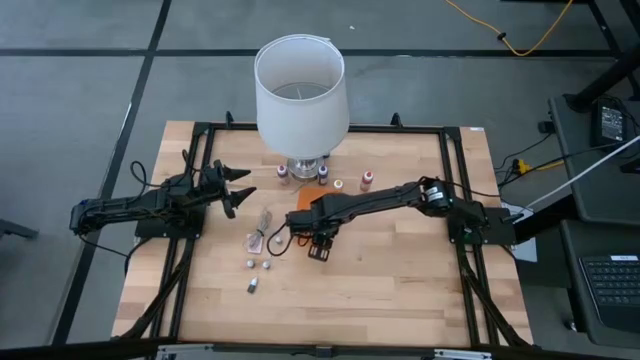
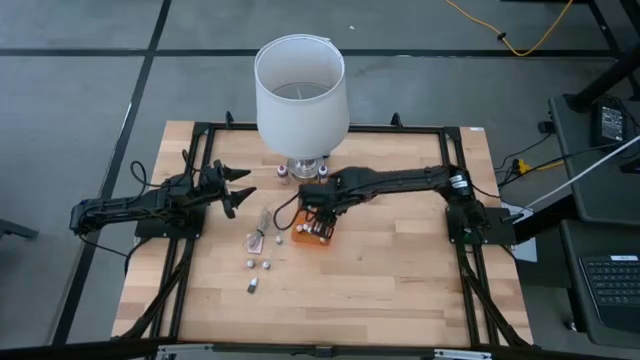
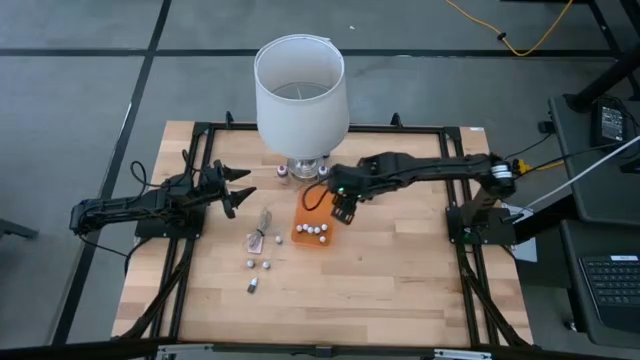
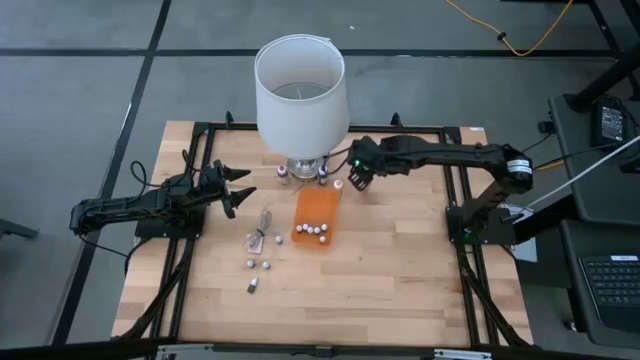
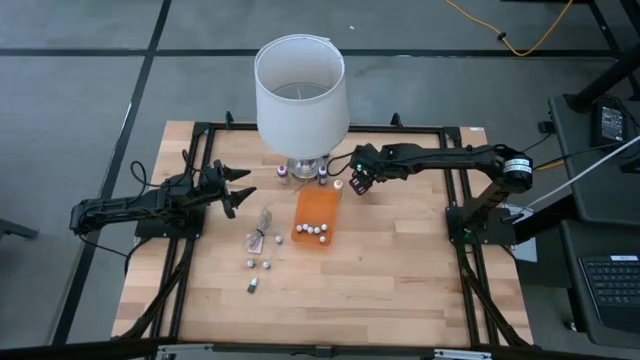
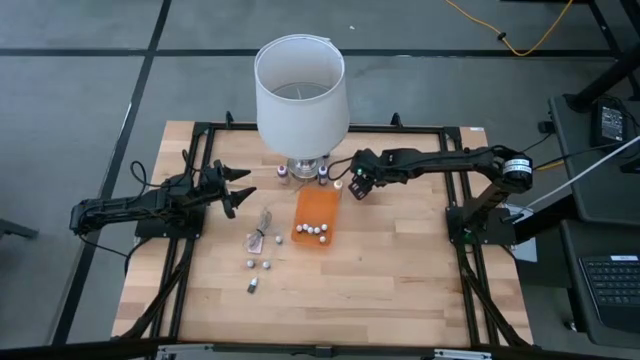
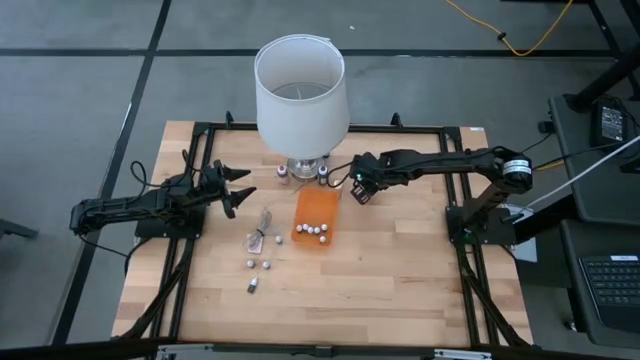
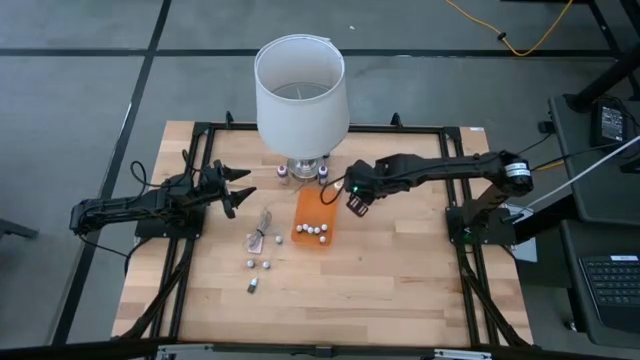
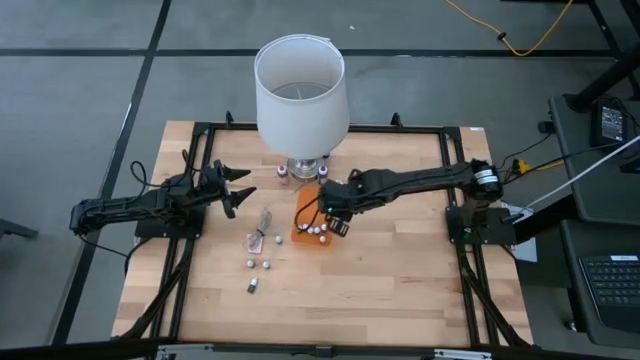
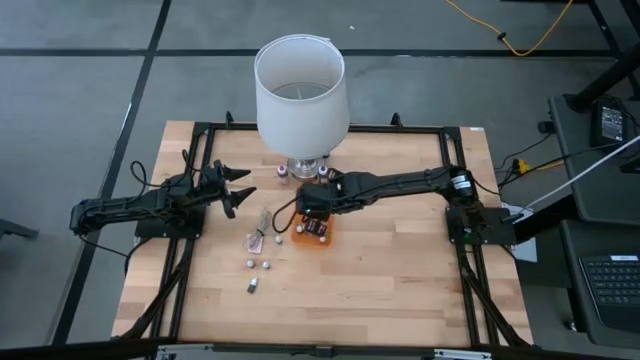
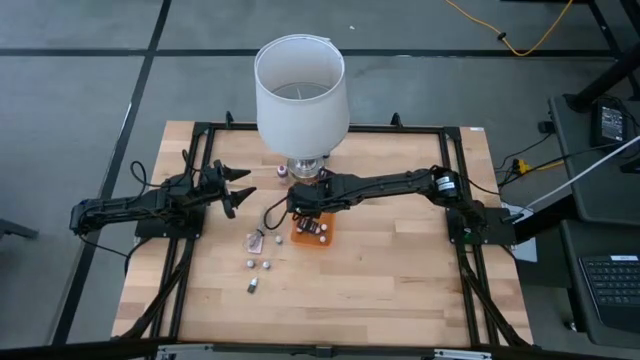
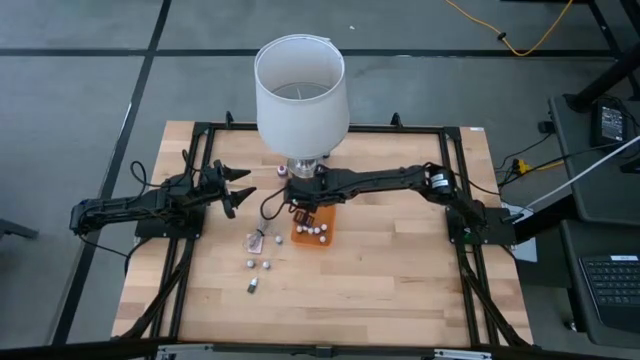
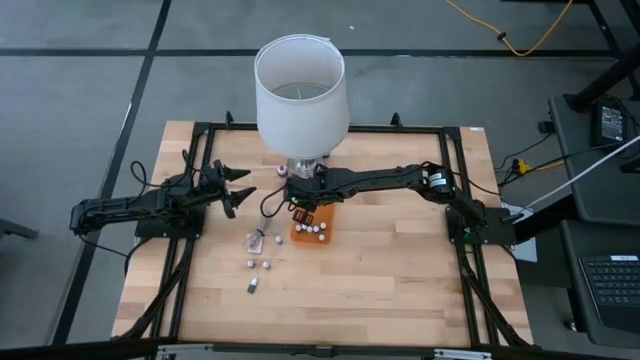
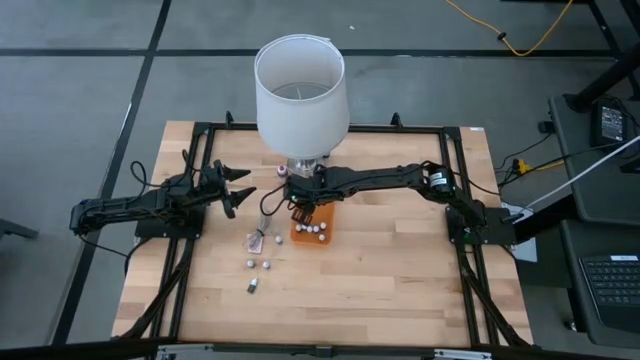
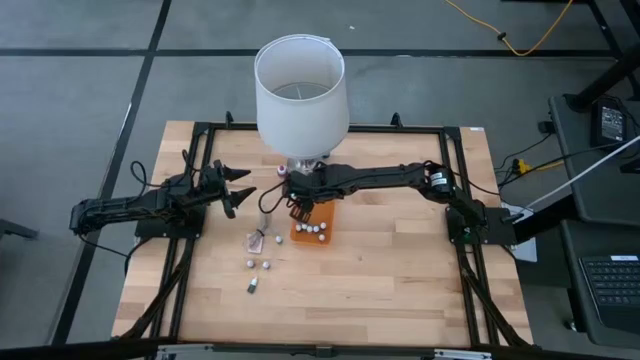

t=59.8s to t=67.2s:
Task: Pick & Place food coloring
Put the large orange food coloring bottle into the orange bin

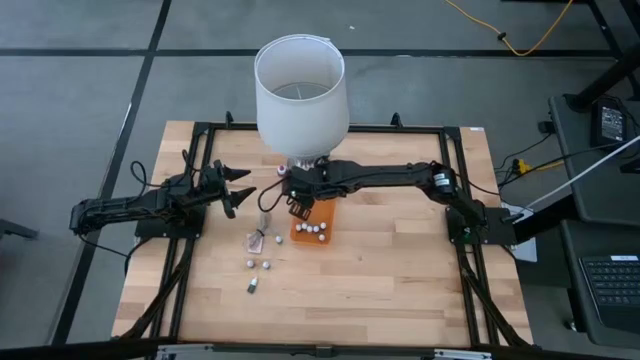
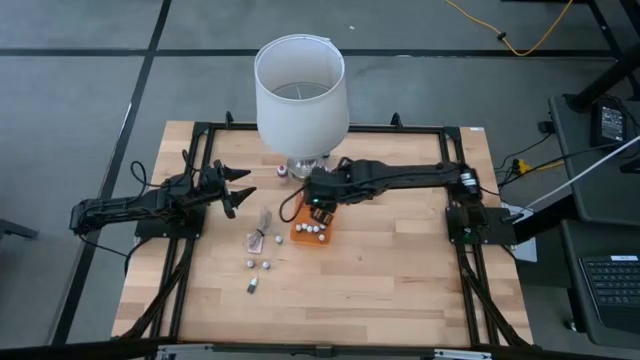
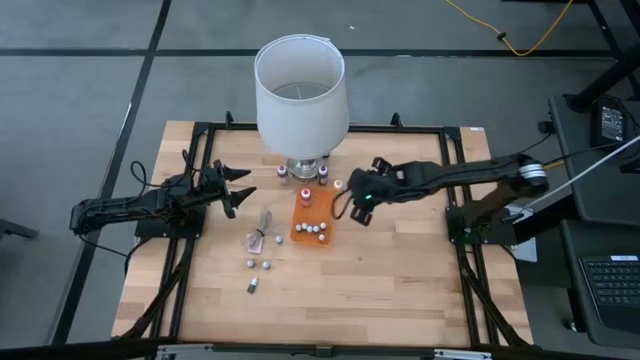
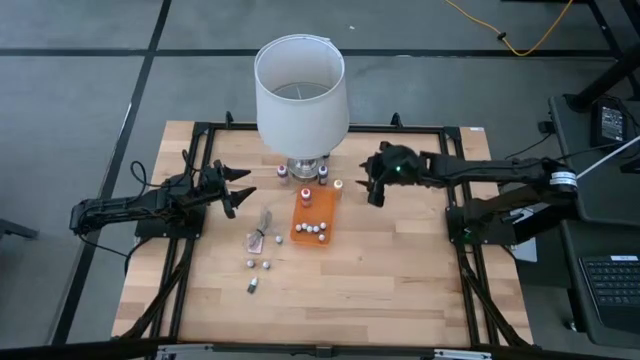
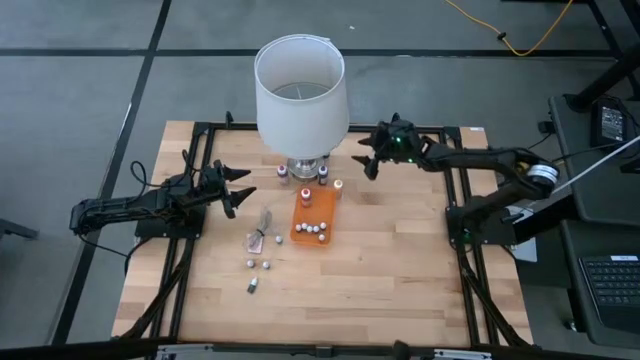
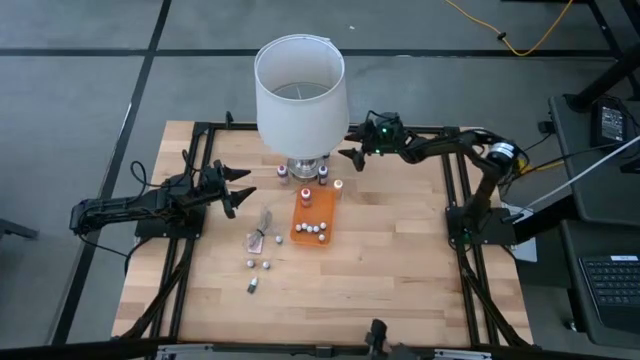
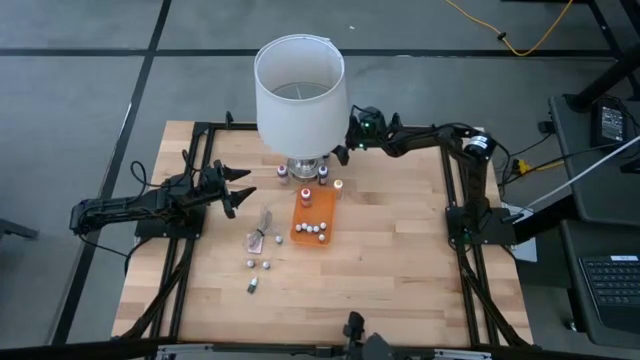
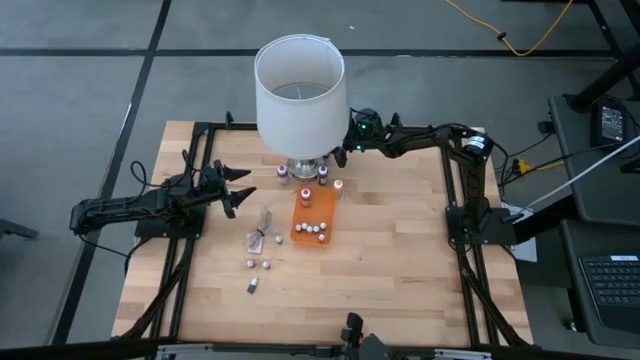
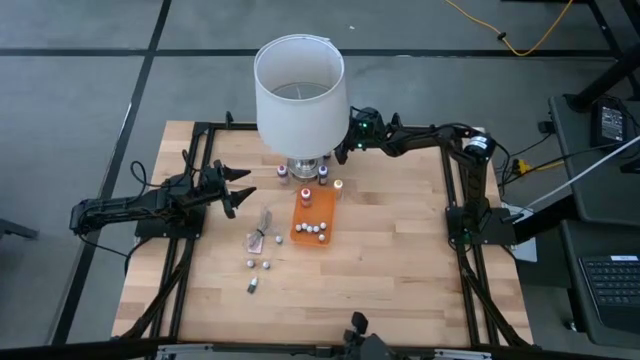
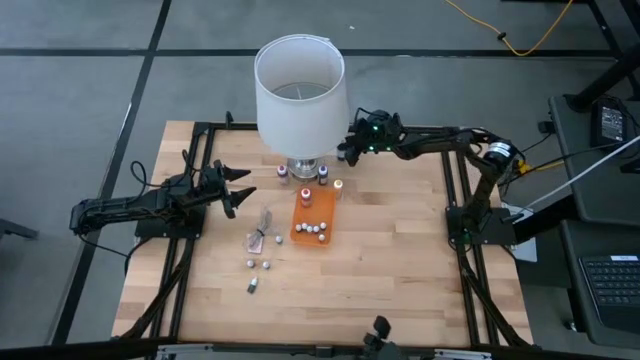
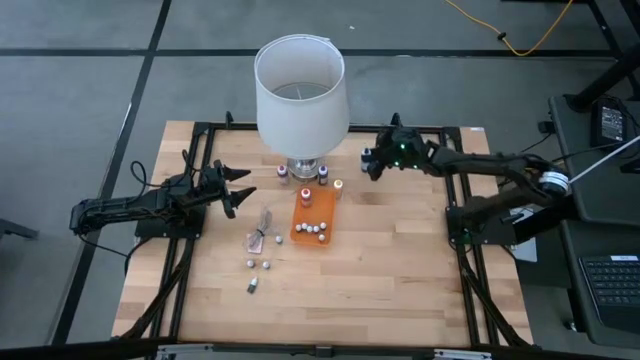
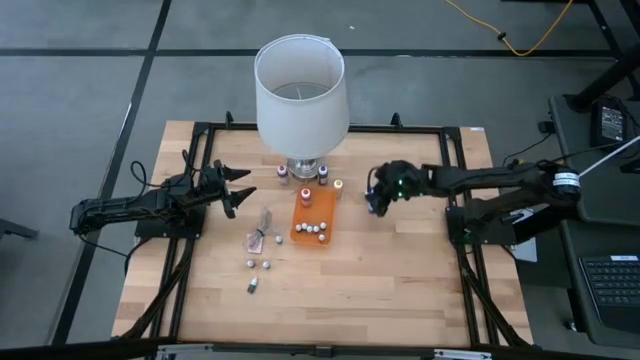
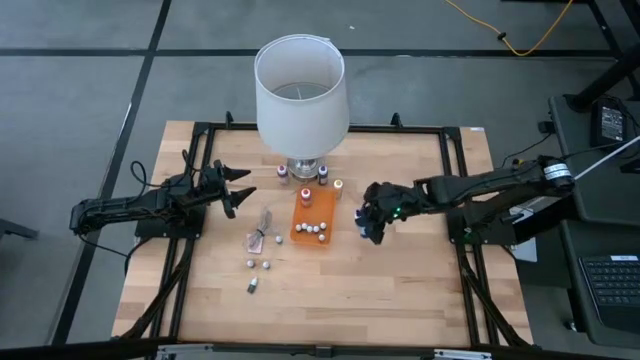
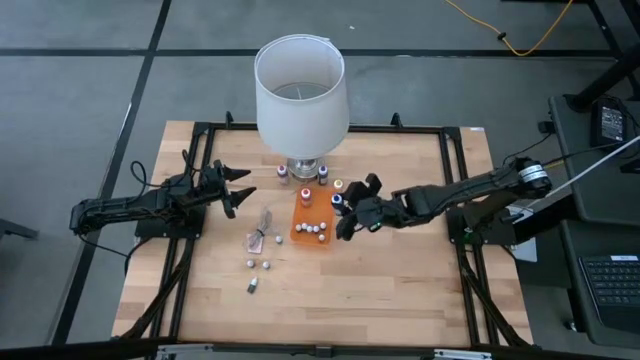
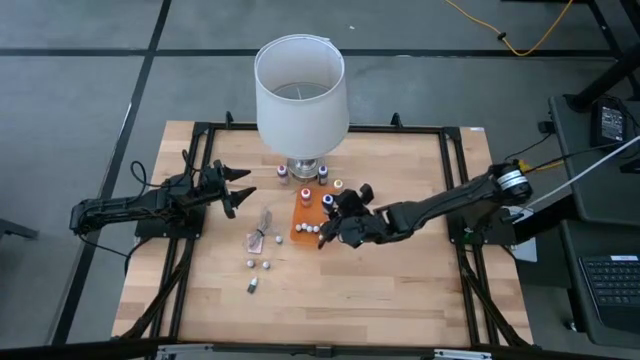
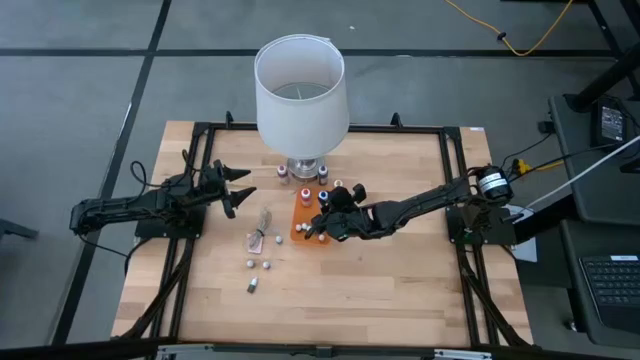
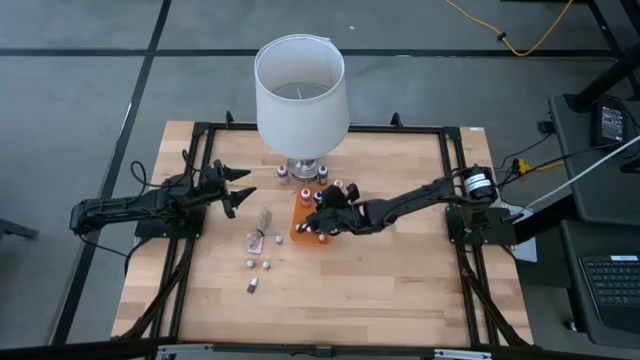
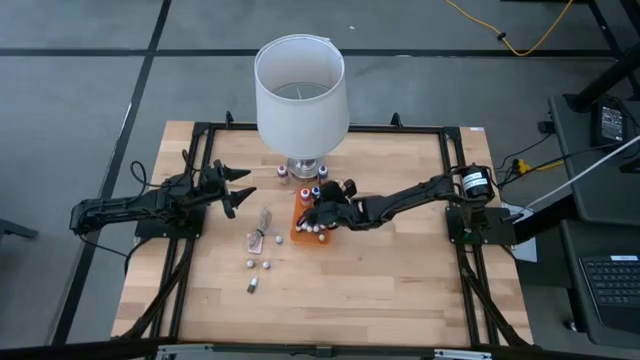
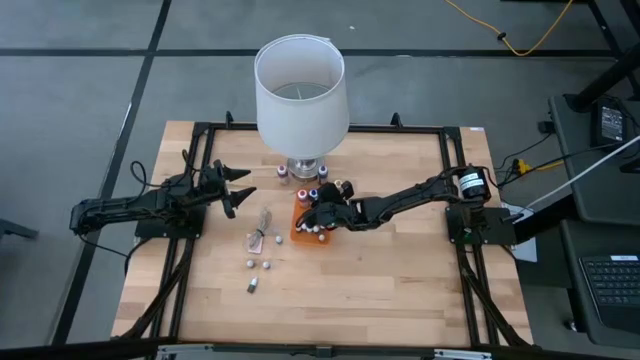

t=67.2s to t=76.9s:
Put the large blue food coloring bottle into the orange bin

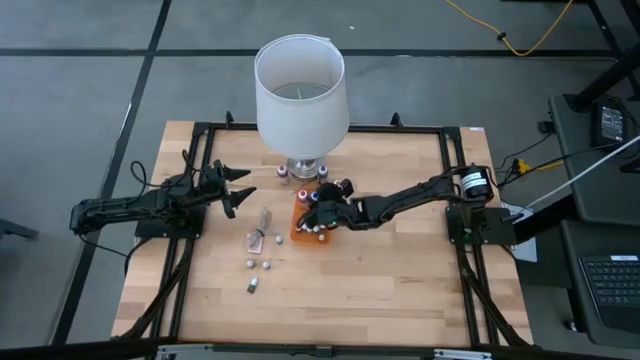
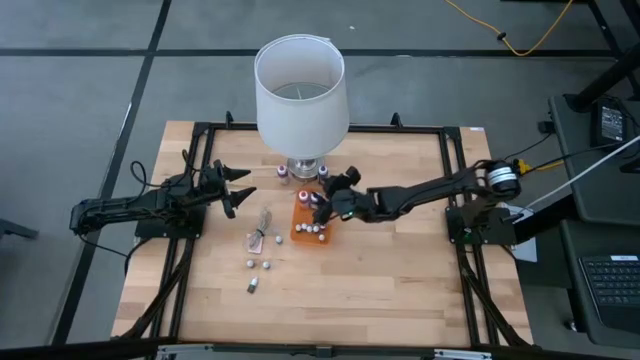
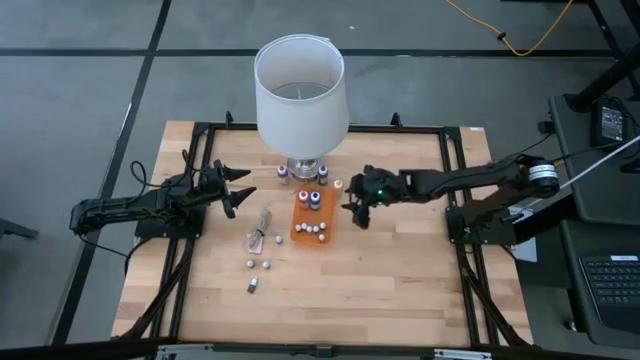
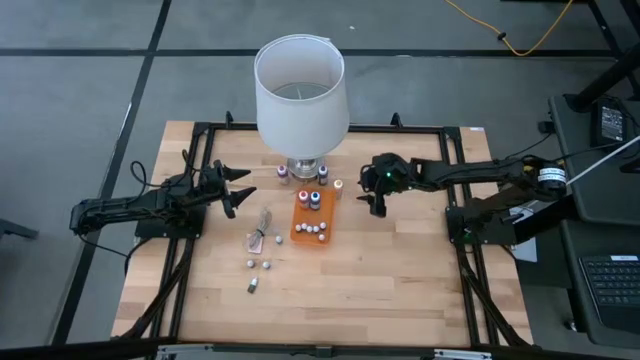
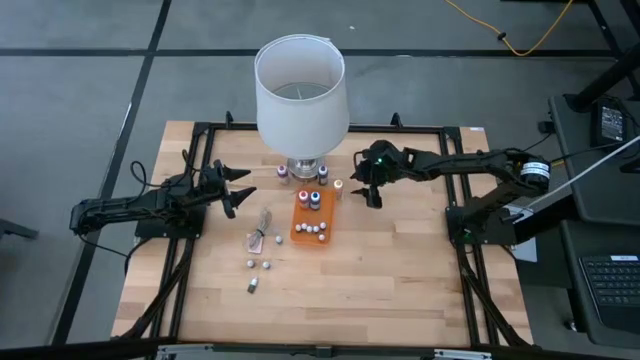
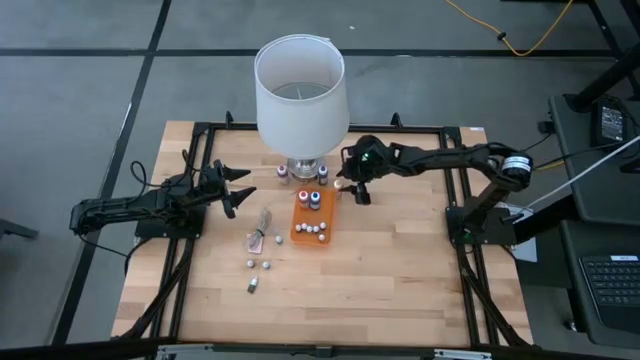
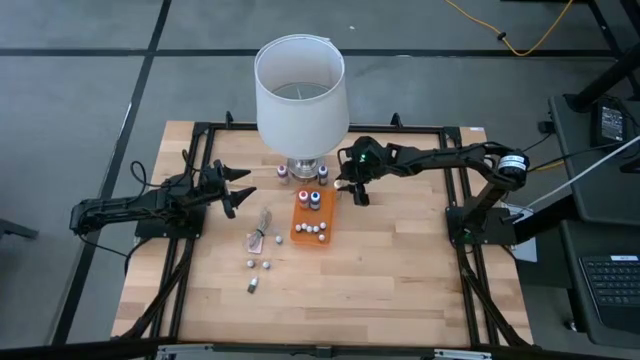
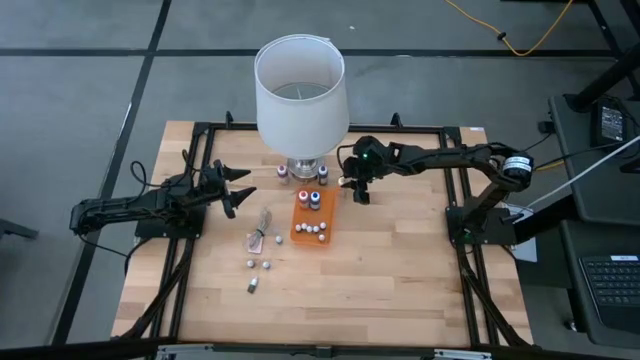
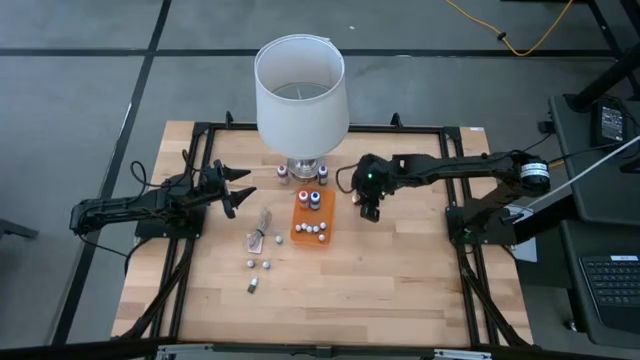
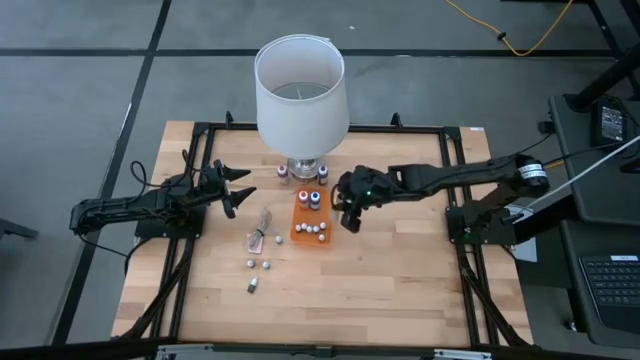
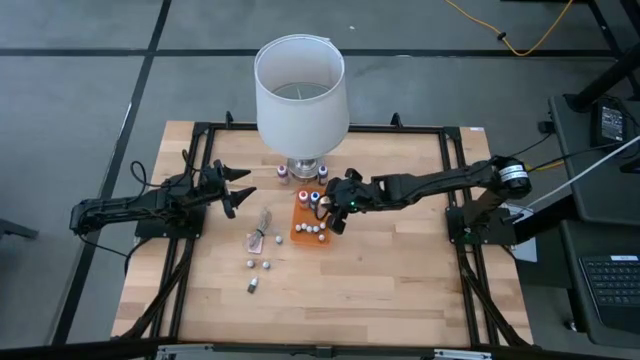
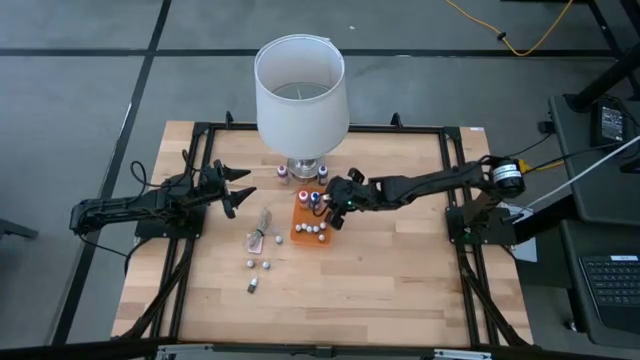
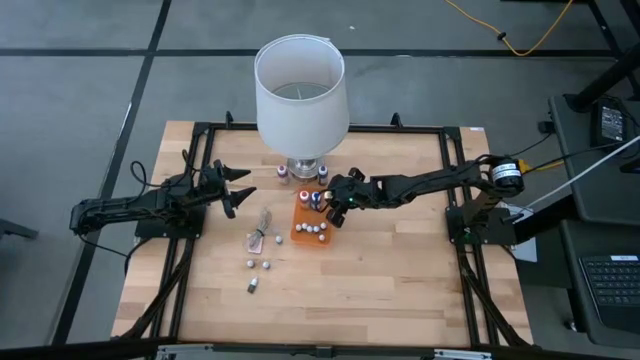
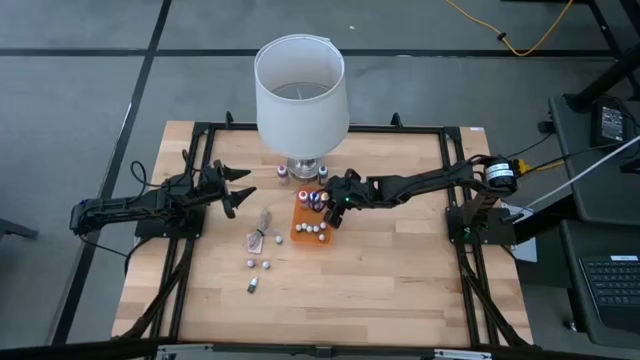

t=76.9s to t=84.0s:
Put the large yellow food coloring bottle into the orange bin
